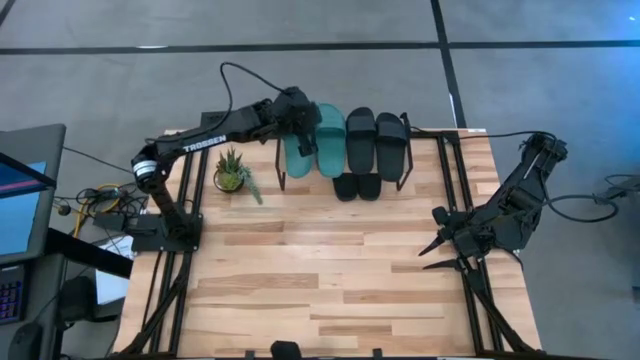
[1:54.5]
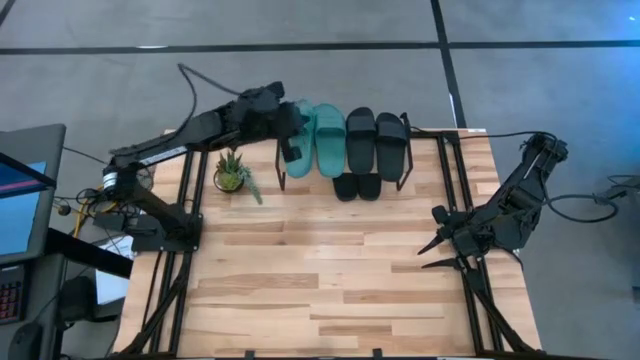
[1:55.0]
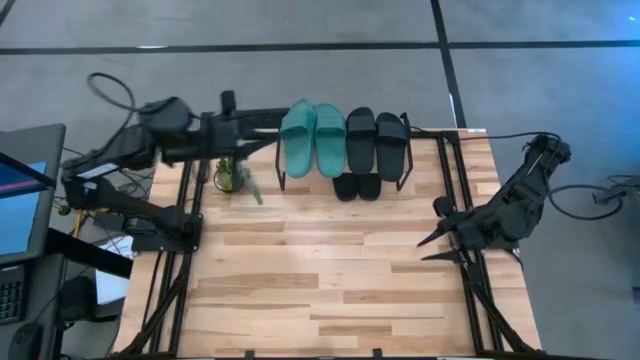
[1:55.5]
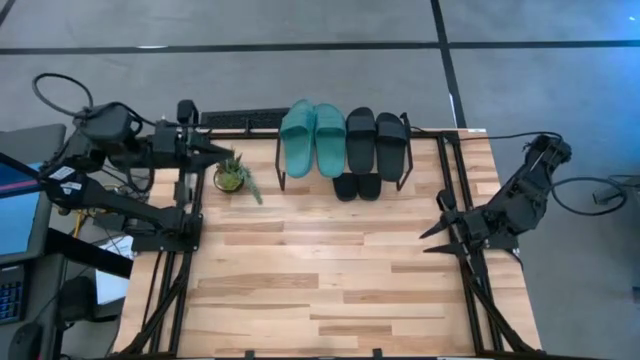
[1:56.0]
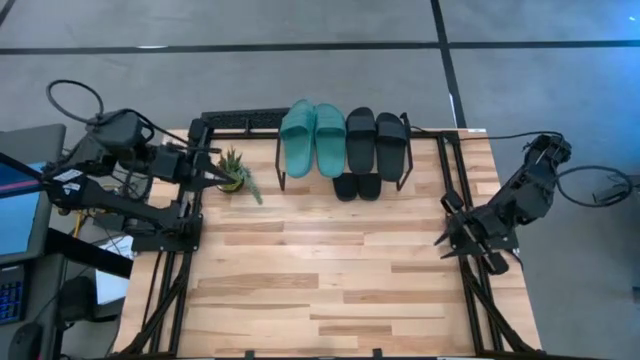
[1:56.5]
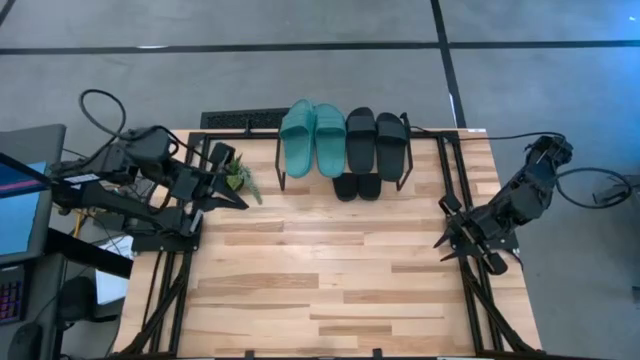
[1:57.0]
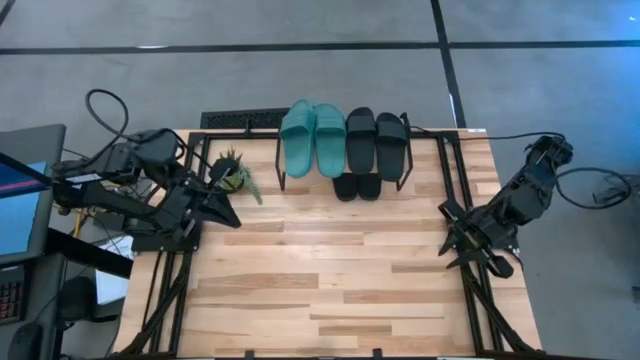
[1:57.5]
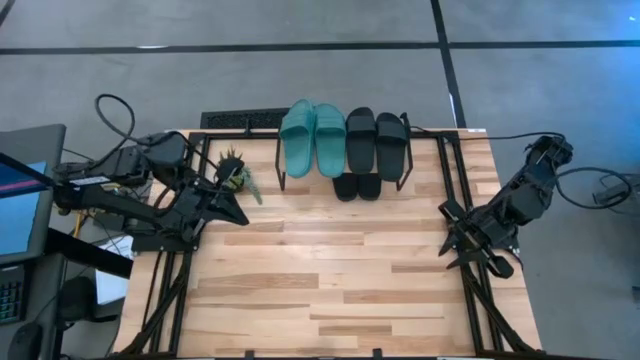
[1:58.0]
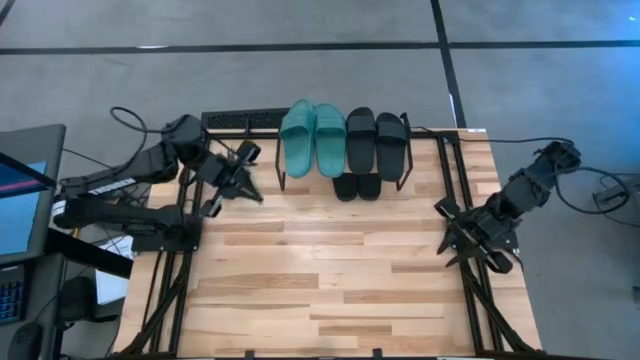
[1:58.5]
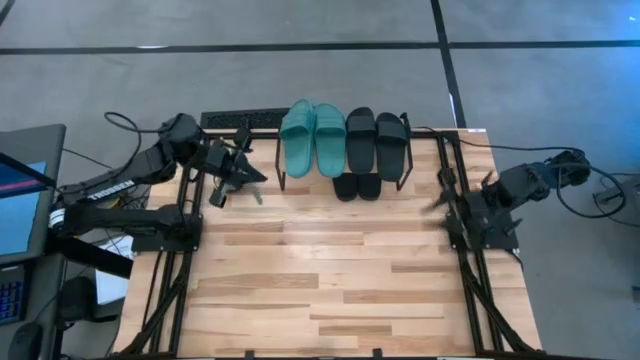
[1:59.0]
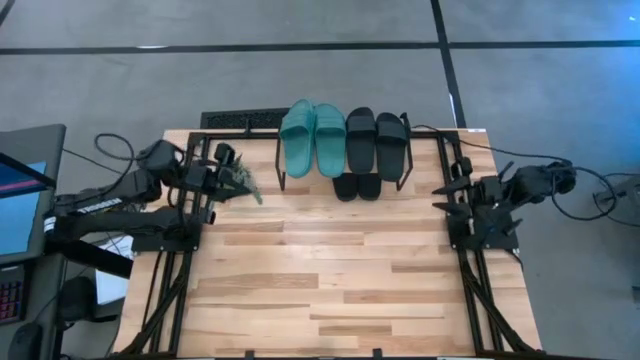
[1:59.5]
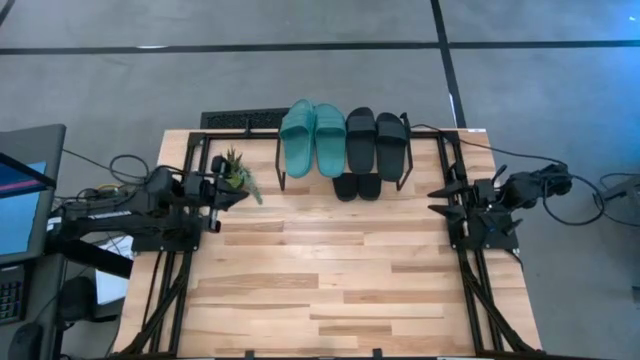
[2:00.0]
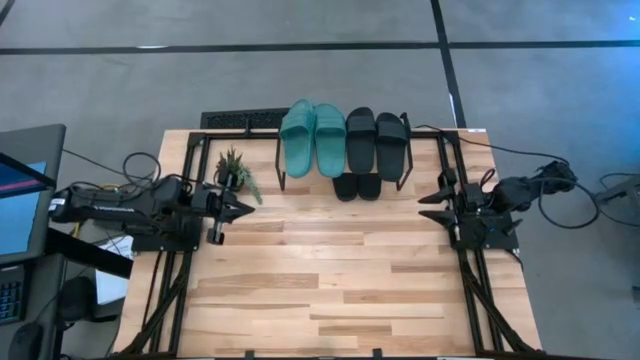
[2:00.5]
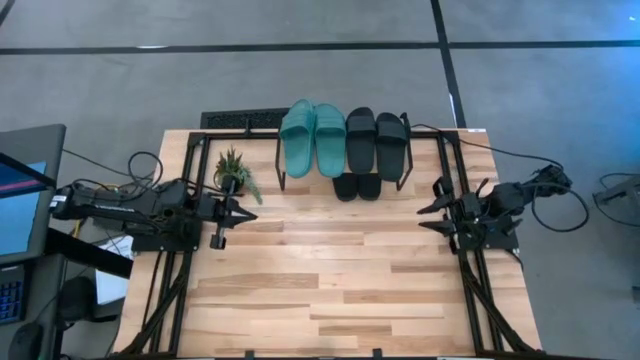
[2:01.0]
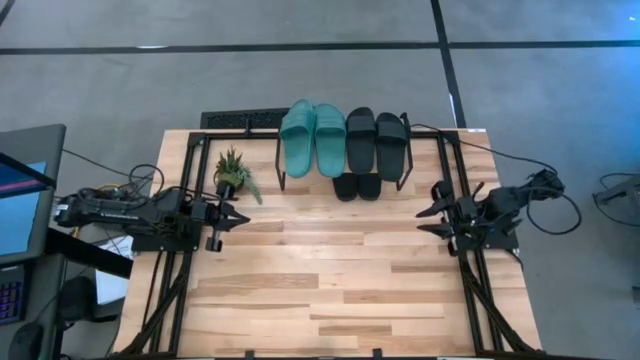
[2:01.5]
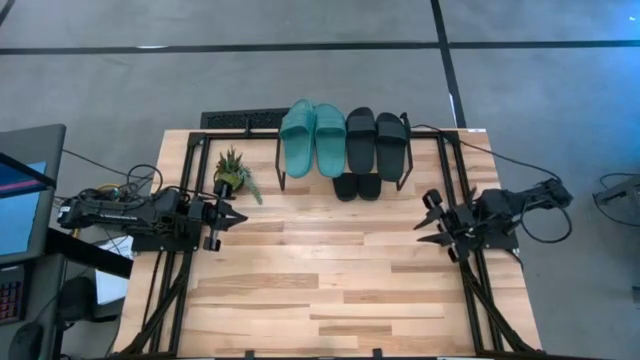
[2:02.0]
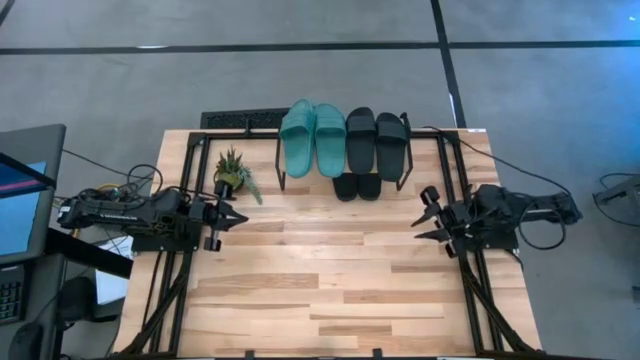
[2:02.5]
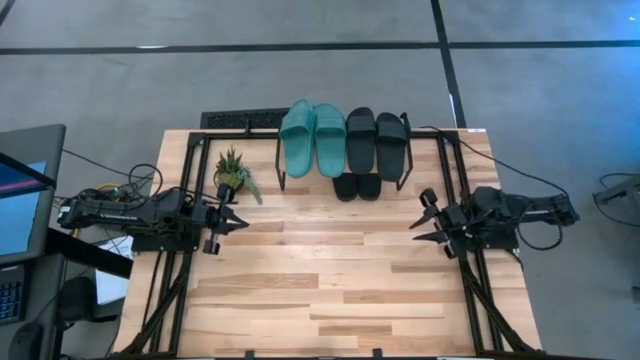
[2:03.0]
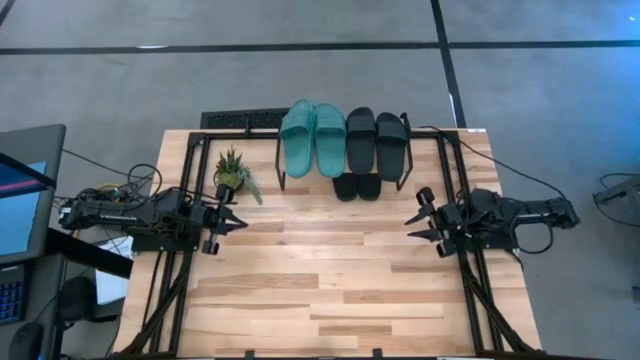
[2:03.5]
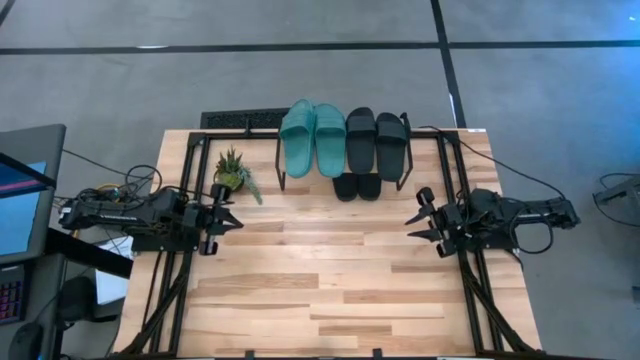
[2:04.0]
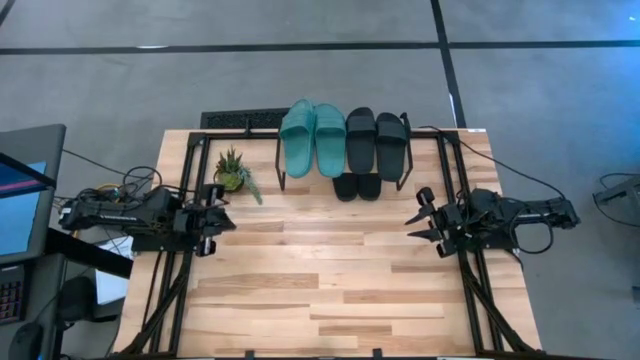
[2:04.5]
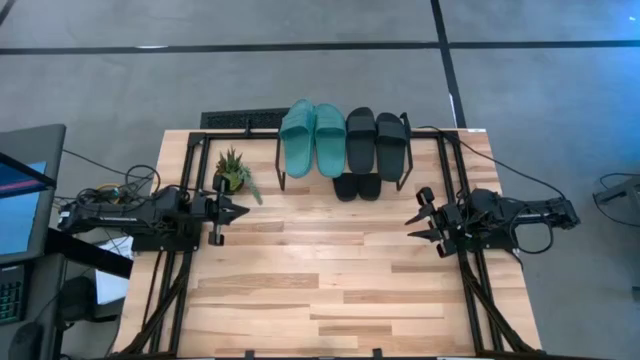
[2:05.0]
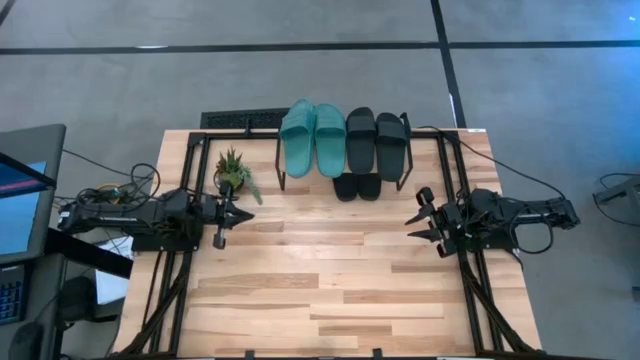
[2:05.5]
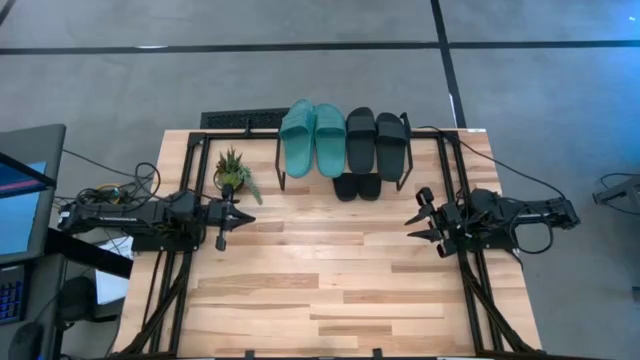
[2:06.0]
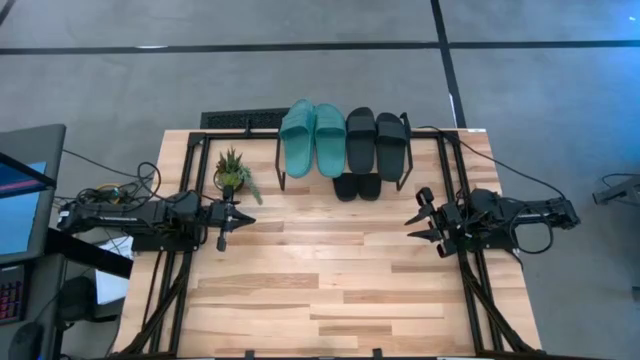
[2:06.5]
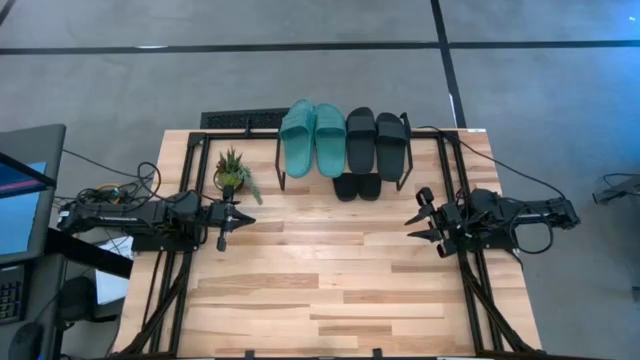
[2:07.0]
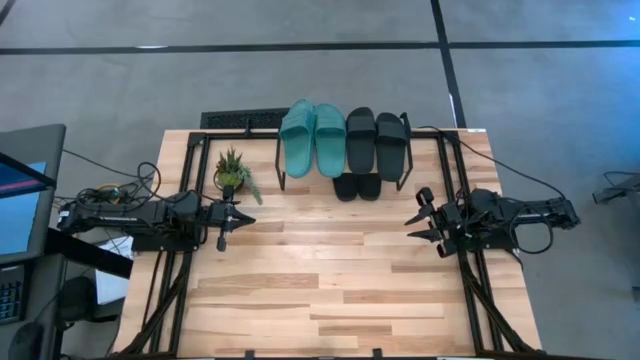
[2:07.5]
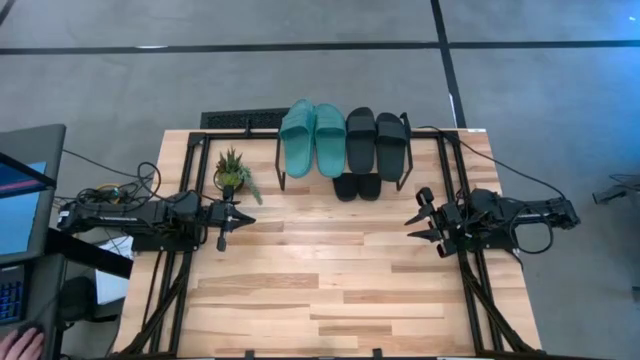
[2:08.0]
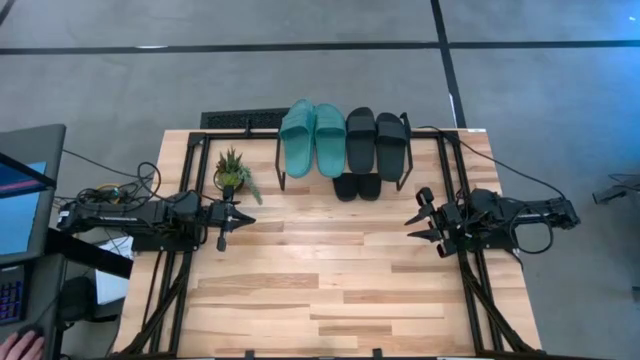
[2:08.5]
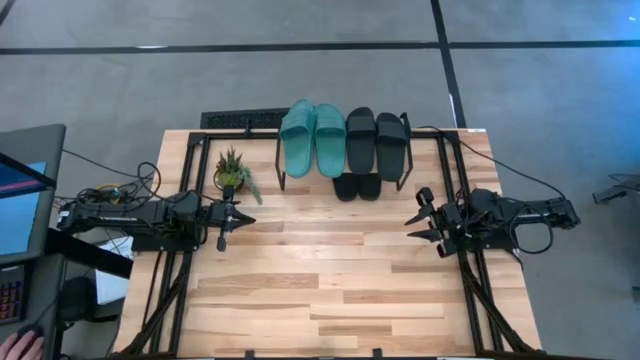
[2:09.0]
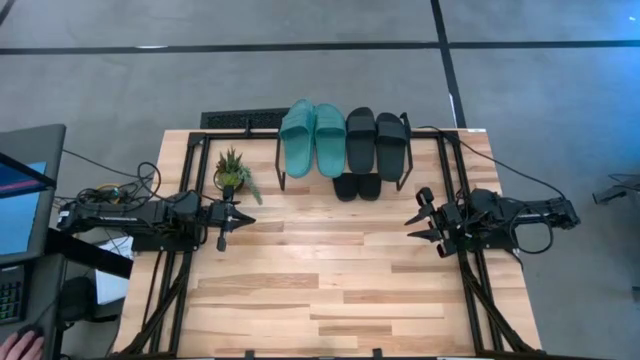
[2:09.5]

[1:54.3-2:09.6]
Task: Pick and place slides into the shelf
Return to Home Position

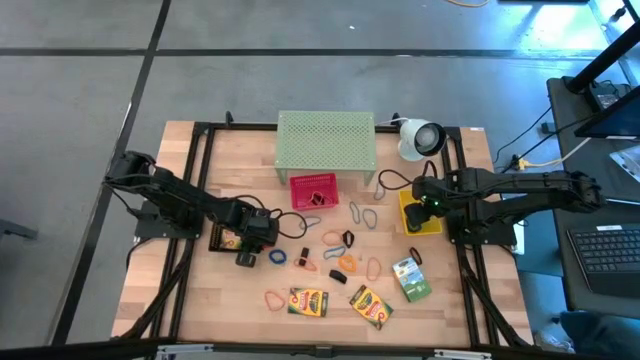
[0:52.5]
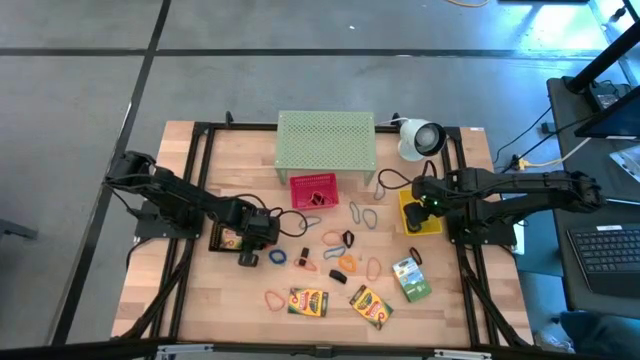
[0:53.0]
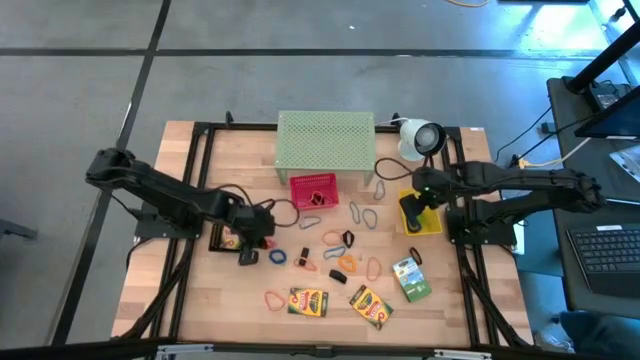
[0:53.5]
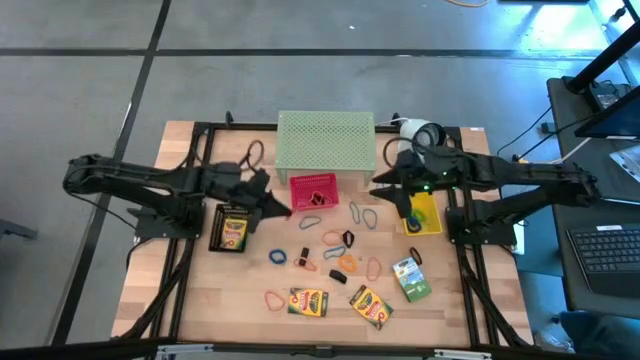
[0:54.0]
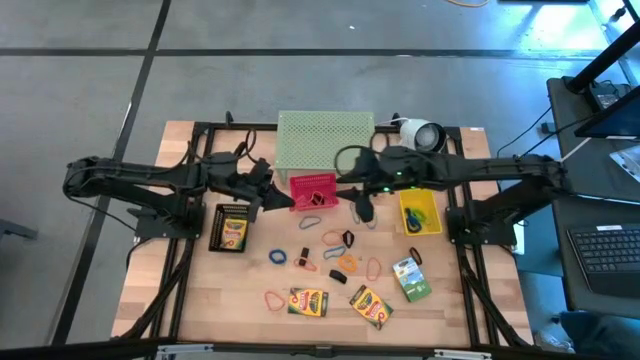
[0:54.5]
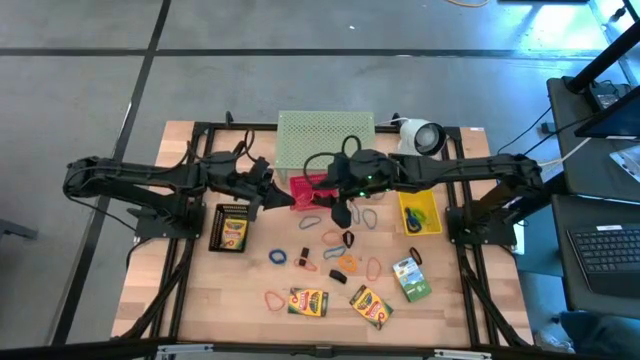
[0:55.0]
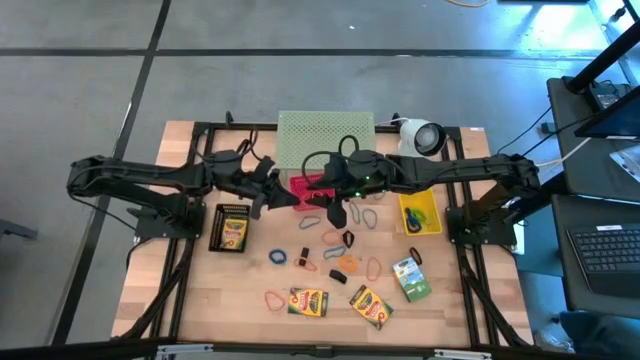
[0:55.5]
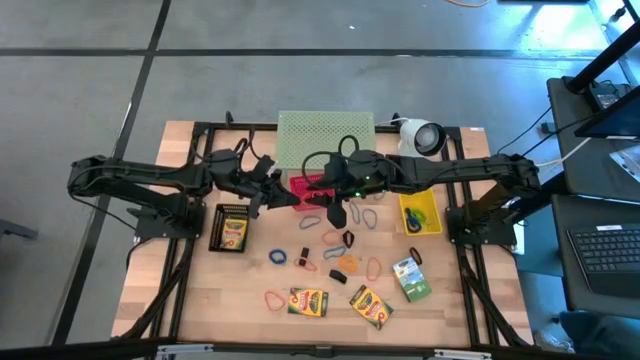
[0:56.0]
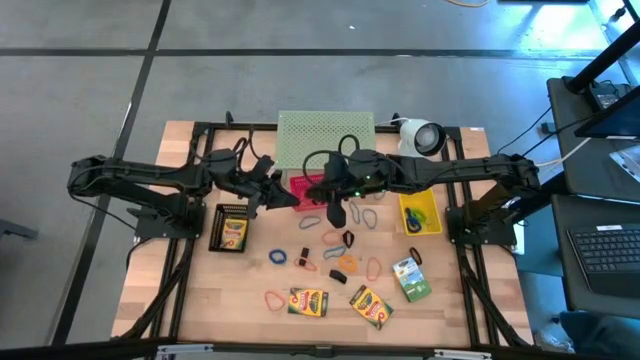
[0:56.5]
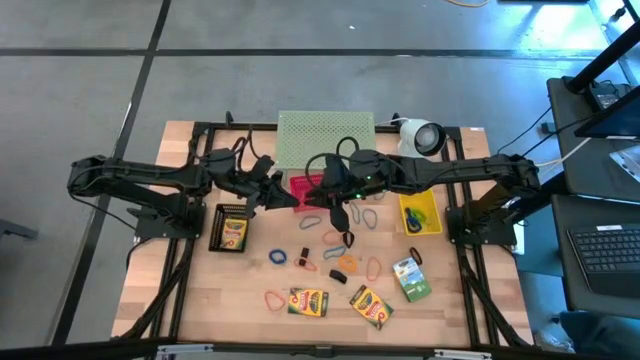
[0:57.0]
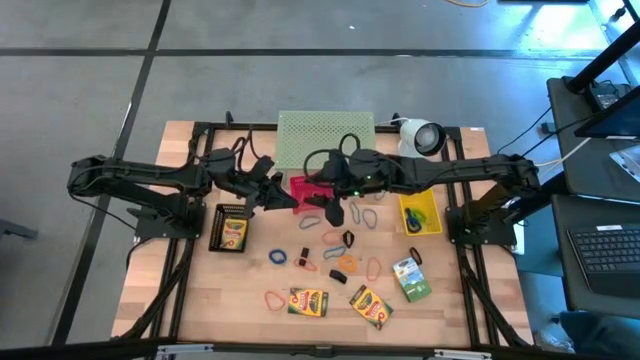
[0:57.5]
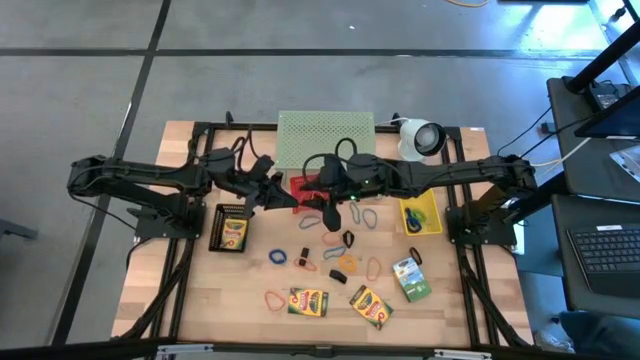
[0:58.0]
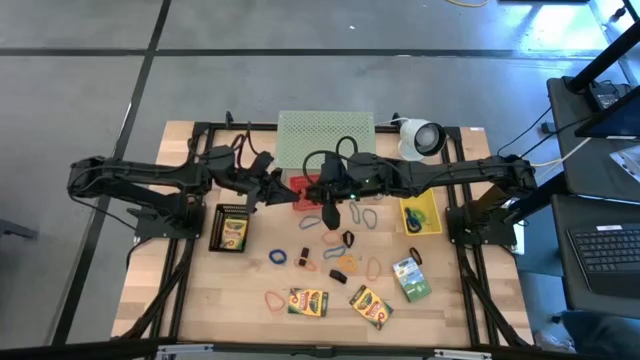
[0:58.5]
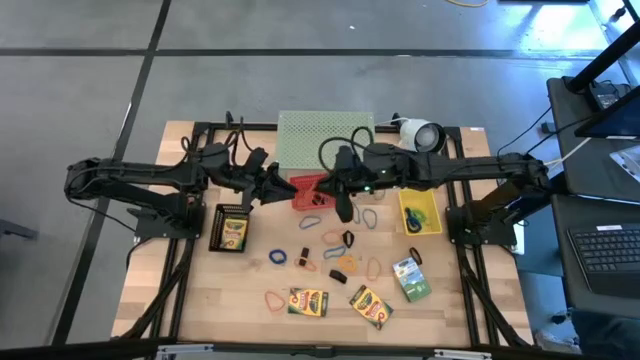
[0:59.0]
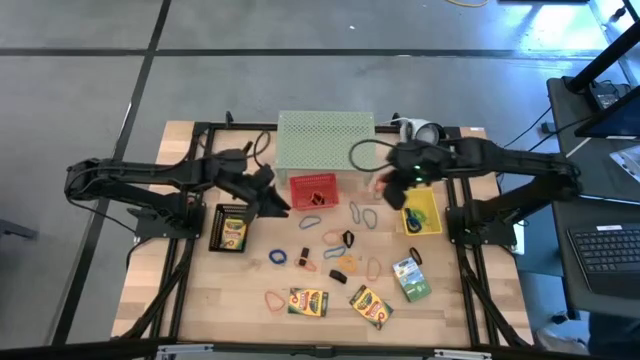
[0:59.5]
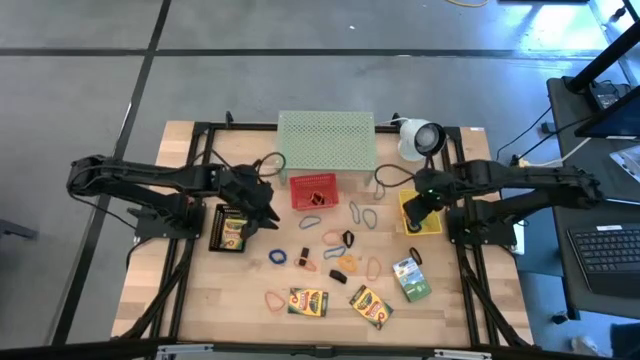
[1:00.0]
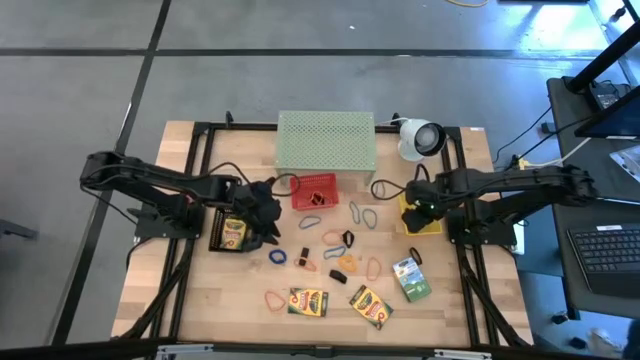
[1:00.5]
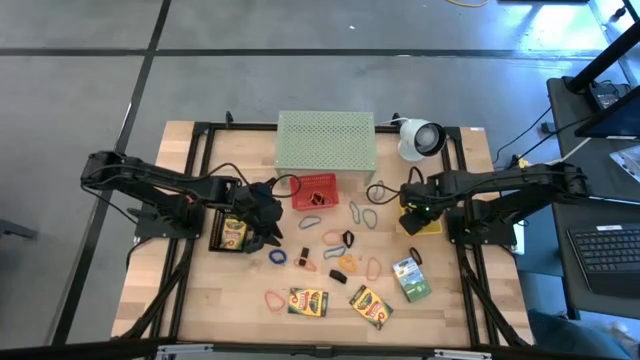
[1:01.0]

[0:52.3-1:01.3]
Task: Pick & Place Office Desk Supplies
Put the orange spring keychain into the yellow bin
